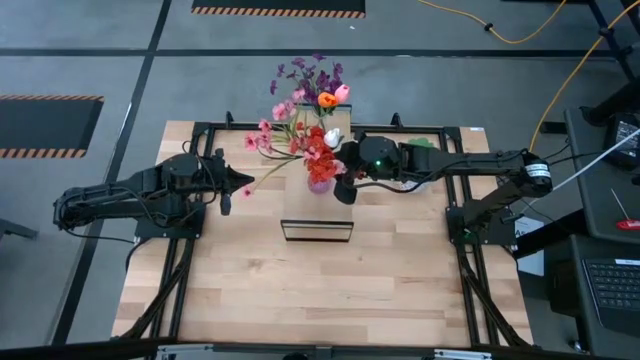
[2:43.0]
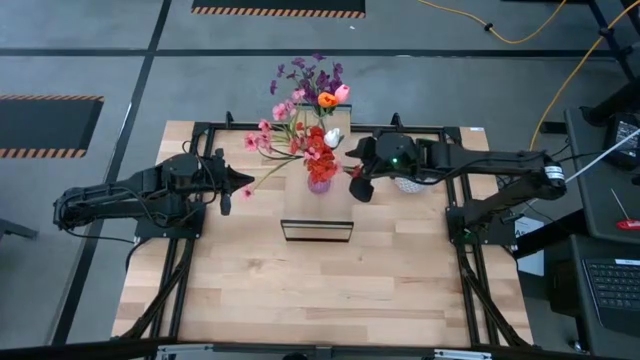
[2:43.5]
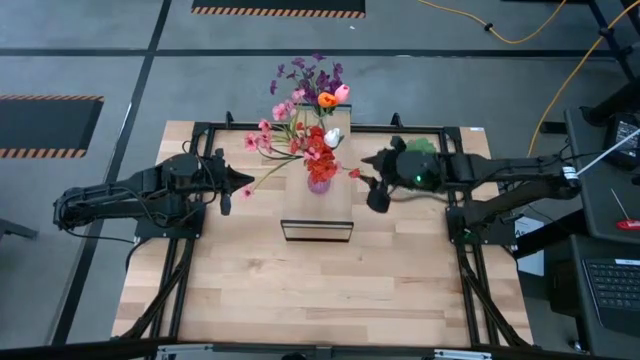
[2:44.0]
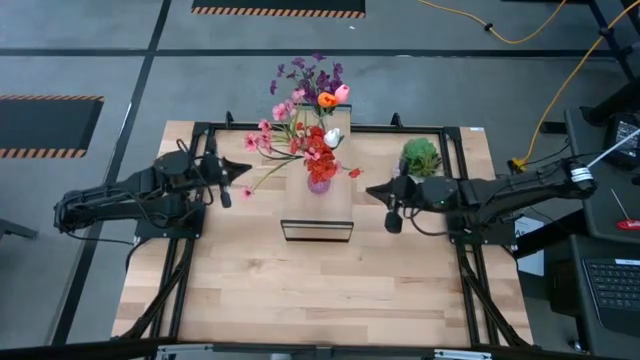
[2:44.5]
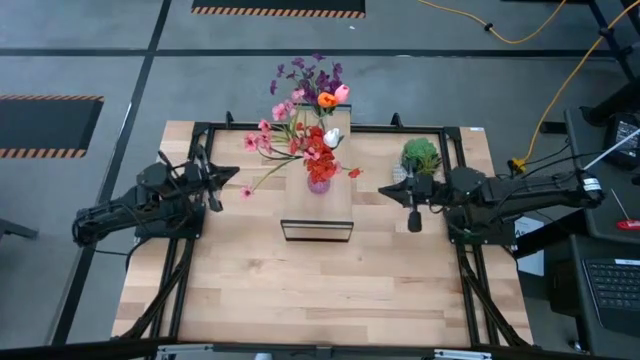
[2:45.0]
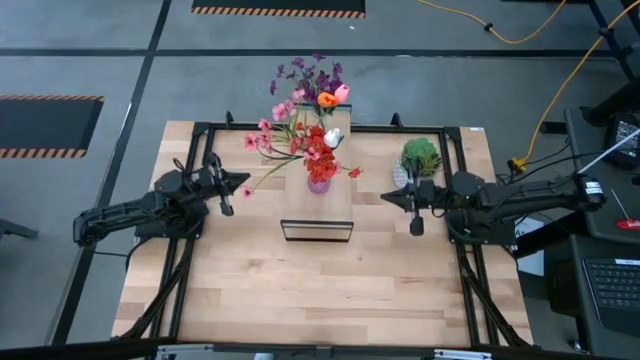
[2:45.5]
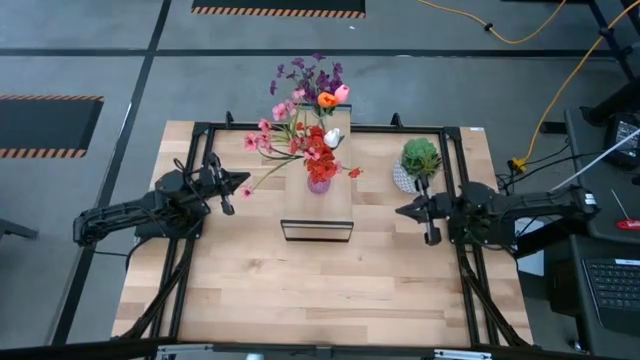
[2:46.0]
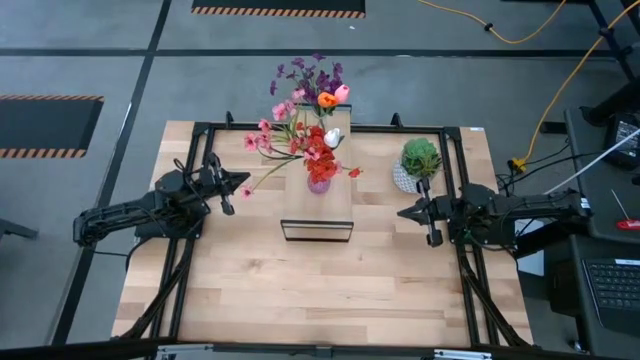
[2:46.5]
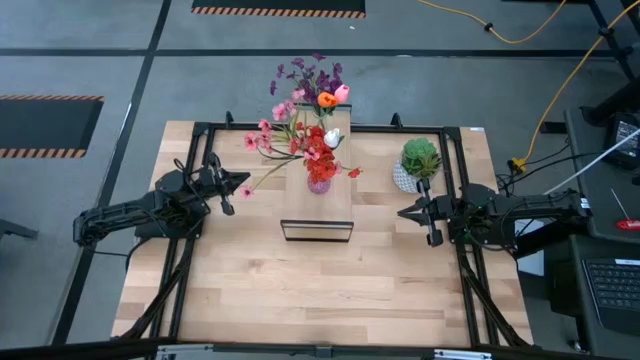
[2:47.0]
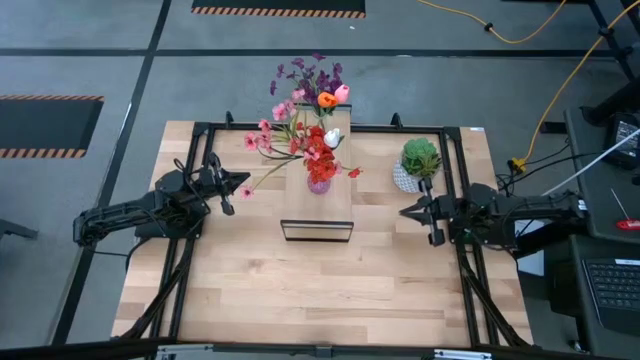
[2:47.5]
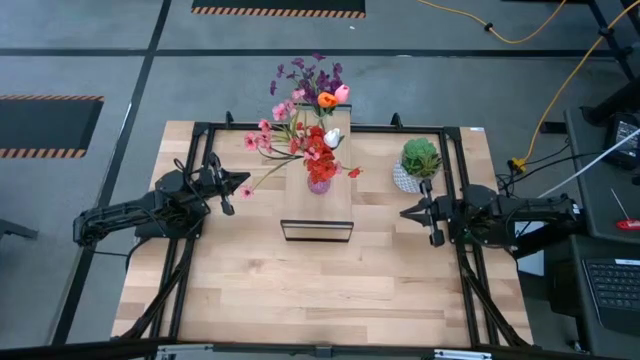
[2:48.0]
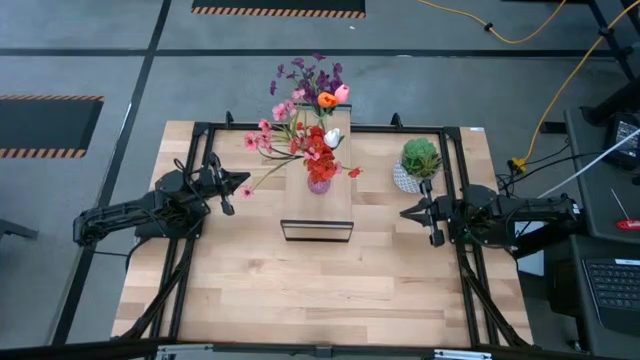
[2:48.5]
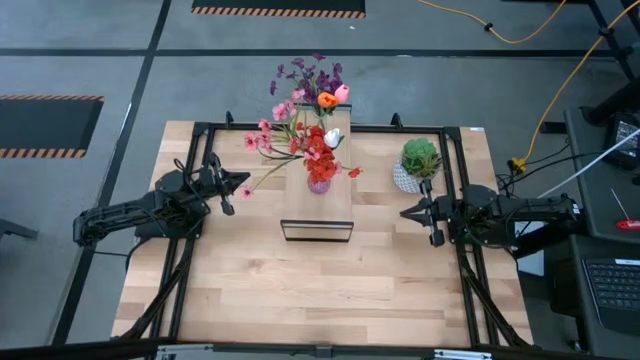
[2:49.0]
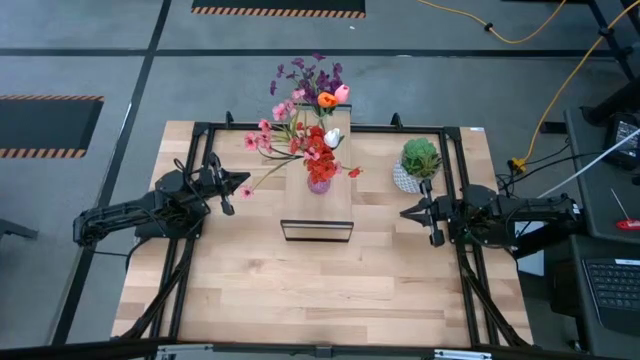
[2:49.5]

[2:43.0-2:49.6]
Task: Pick and place flowers into a vace then onto a shelf
Return to Home Position

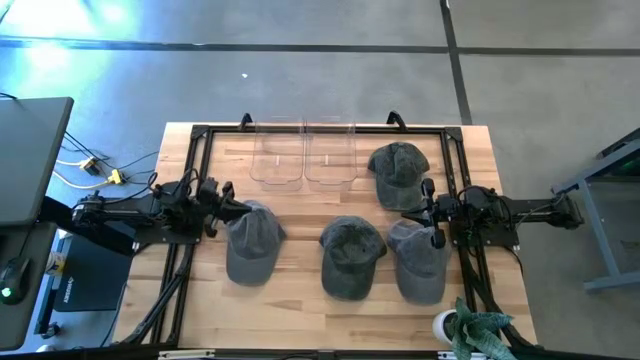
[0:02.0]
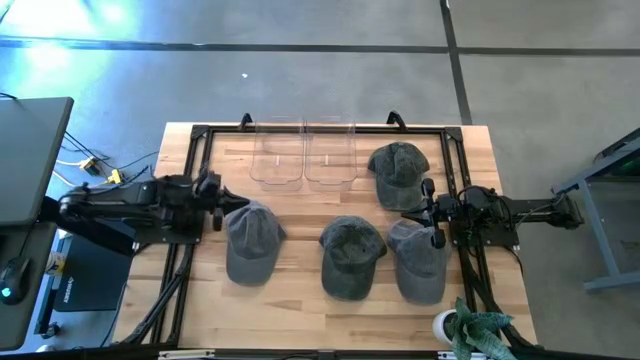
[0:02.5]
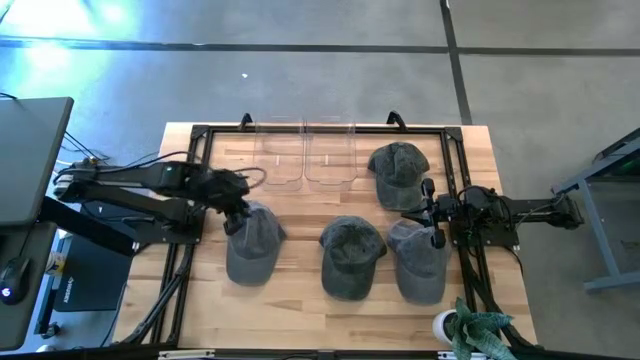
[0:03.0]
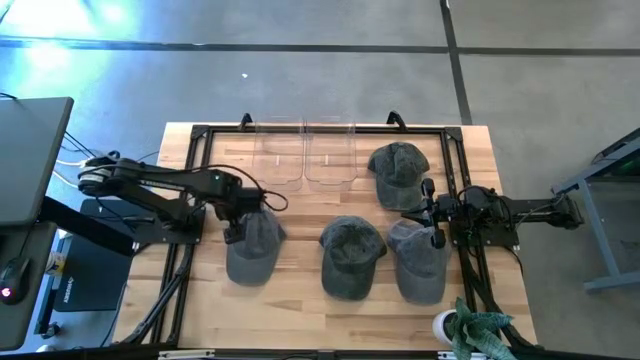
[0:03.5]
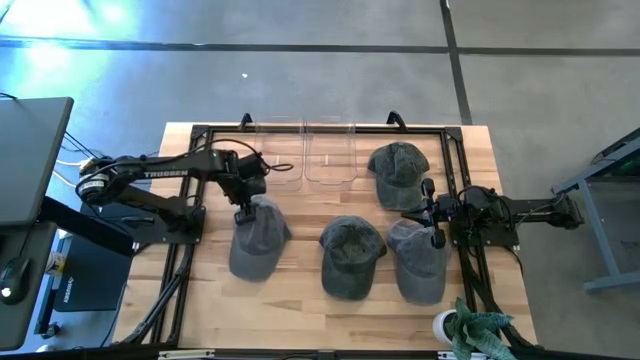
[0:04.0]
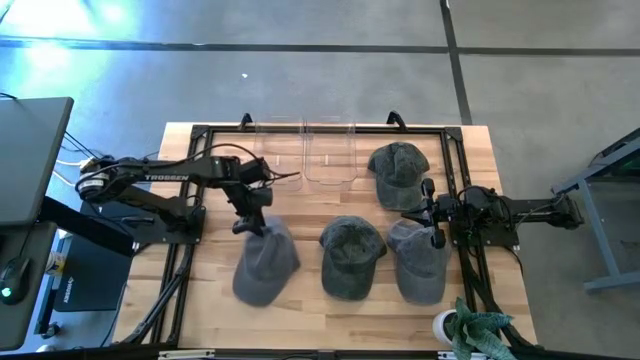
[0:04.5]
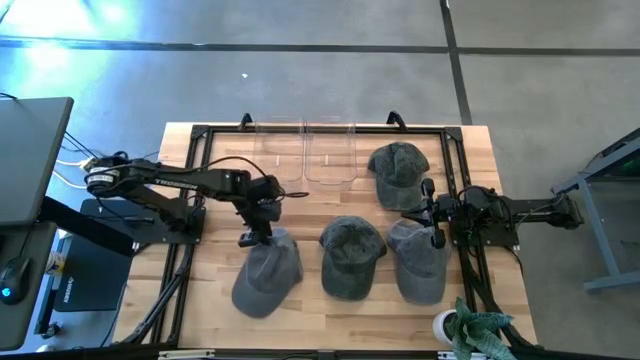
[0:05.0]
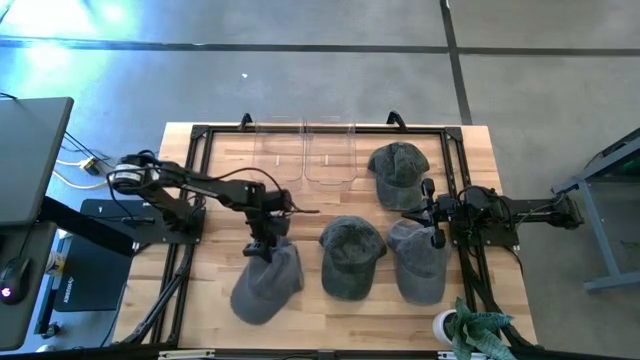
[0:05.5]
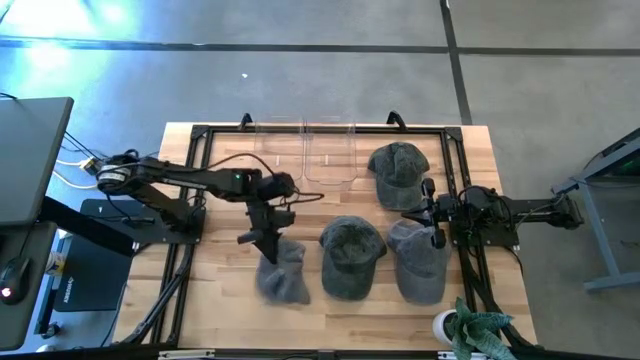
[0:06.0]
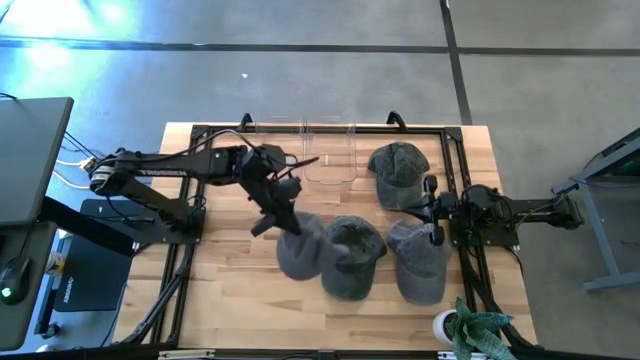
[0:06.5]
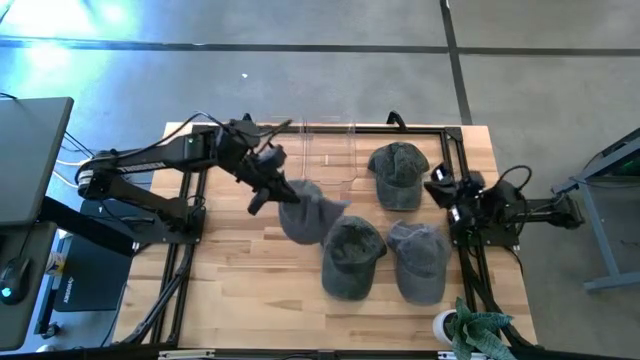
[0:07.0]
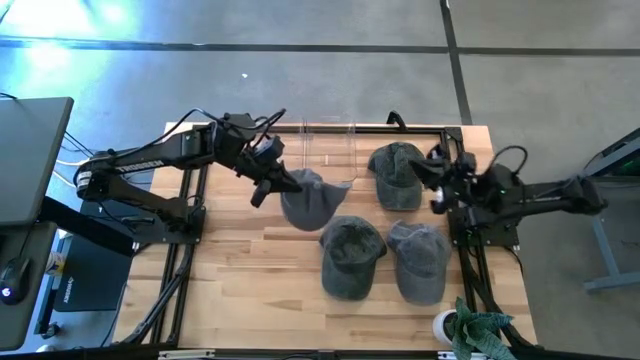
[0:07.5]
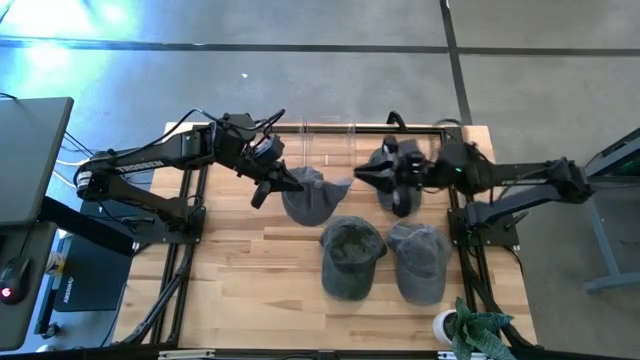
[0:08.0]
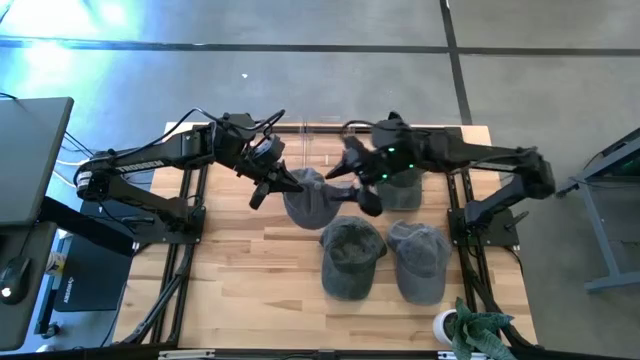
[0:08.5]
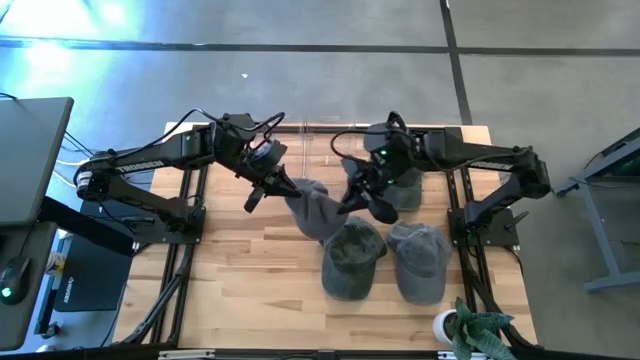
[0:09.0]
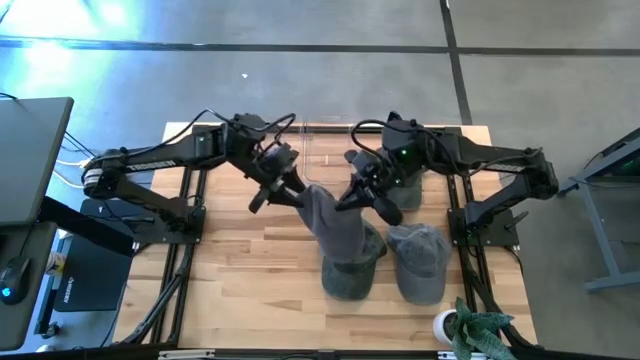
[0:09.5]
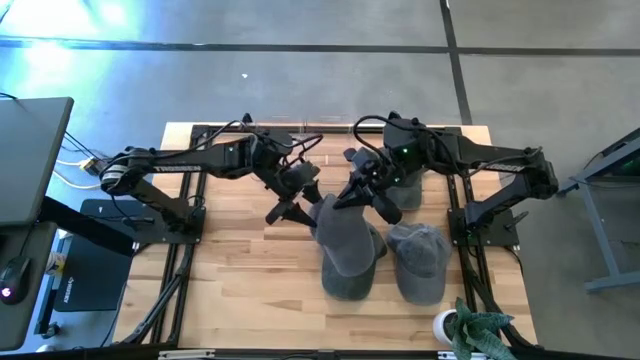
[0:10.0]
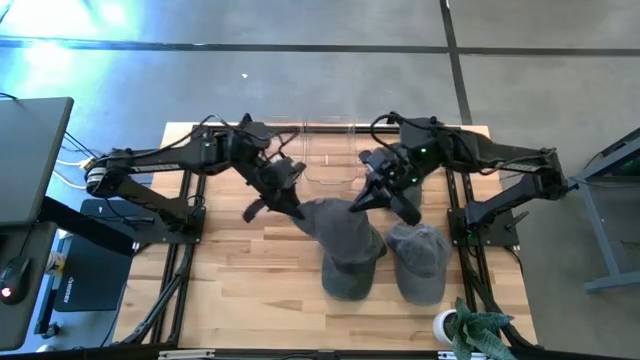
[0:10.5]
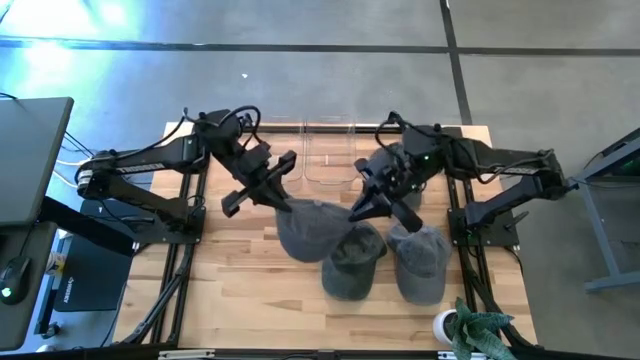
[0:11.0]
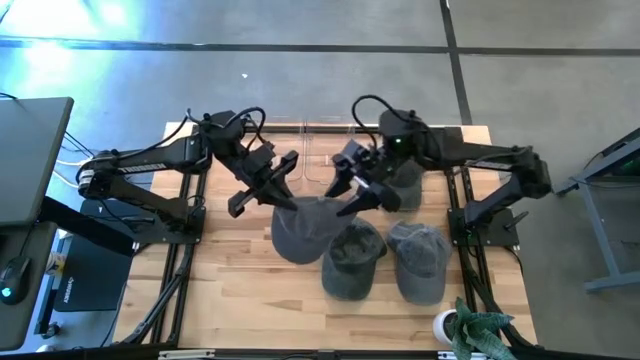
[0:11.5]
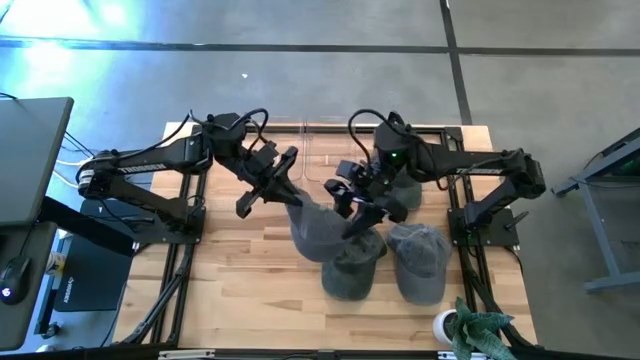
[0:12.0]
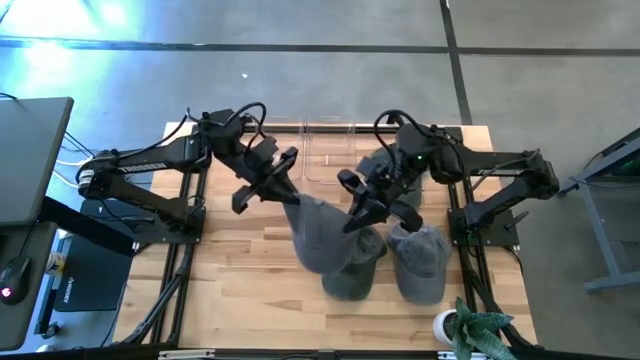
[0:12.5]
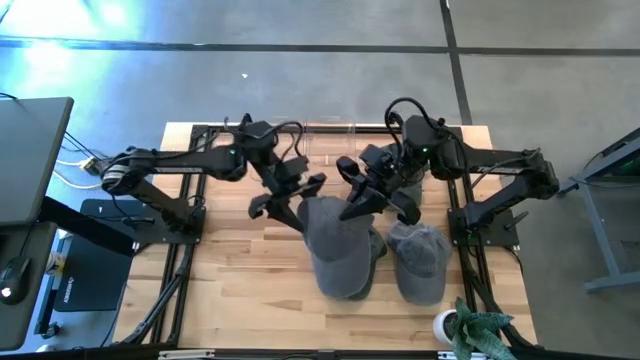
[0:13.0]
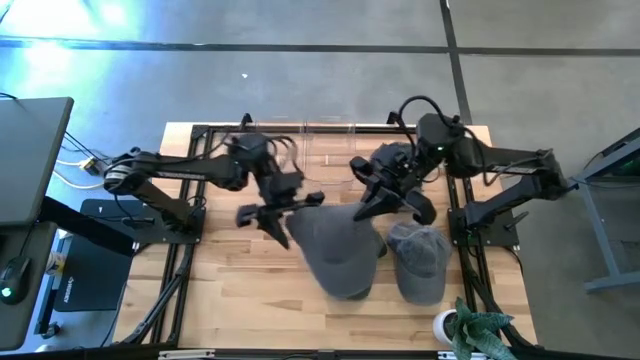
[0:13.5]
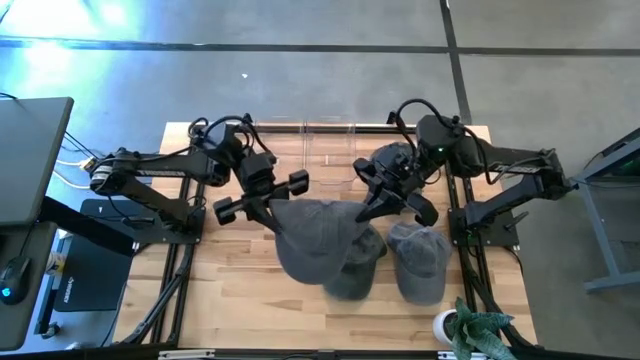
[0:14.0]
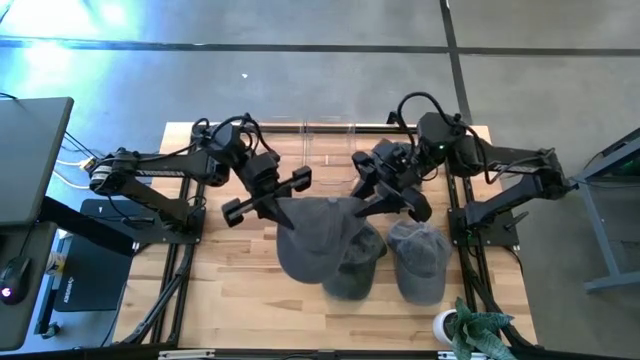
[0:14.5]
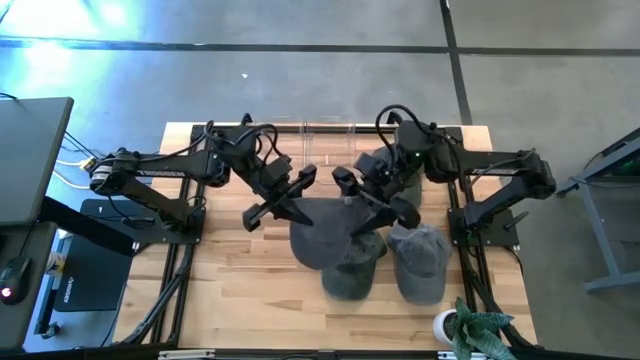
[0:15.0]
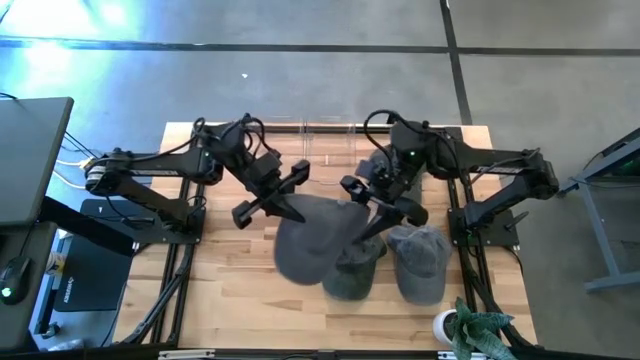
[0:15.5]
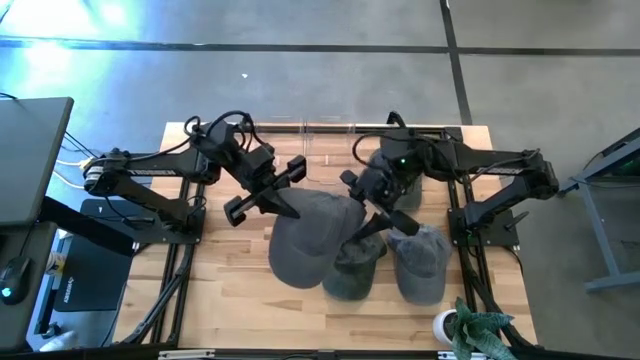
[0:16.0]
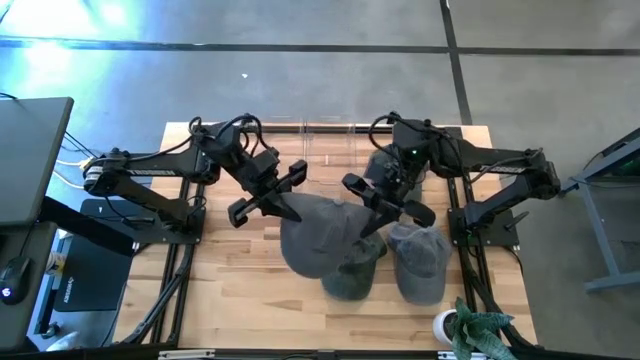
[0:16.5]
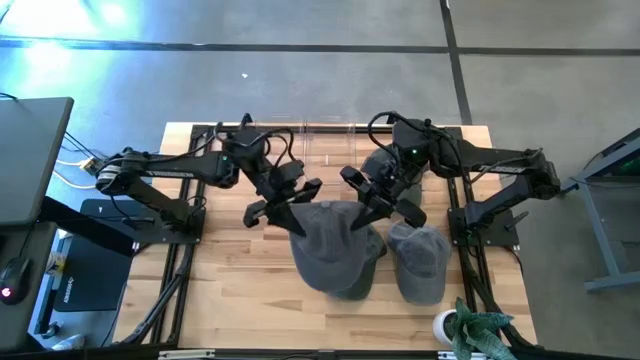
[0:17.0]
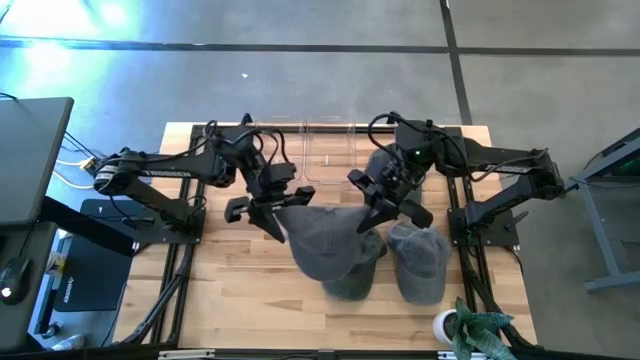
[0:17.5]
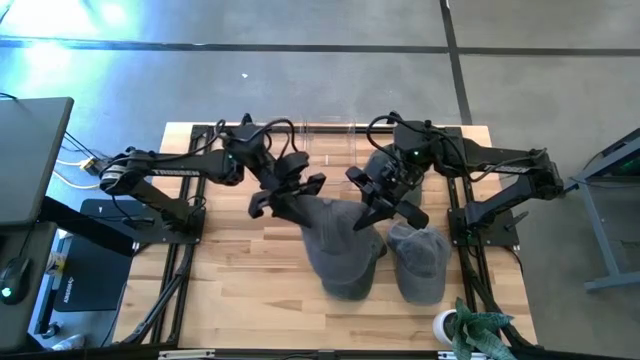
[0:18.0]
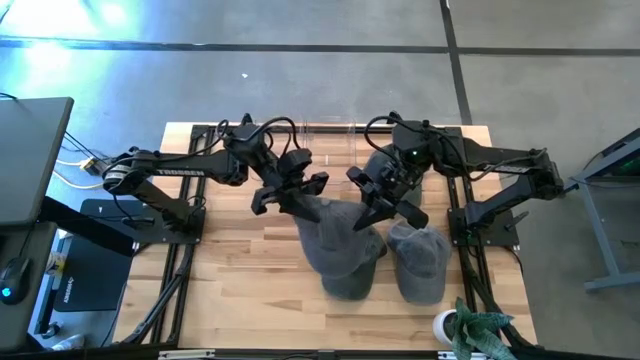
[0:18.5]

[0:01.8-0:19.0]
Task: Pick & Place hat
Put the left gray cap into the left transparent bin
